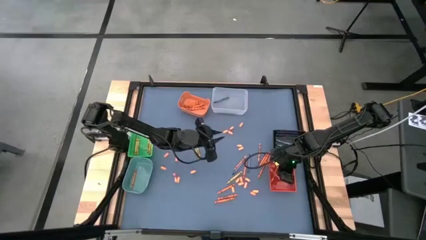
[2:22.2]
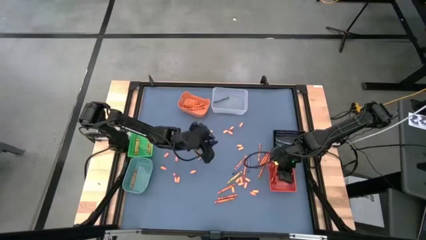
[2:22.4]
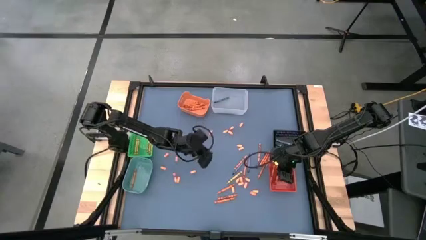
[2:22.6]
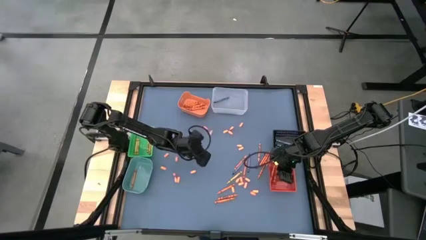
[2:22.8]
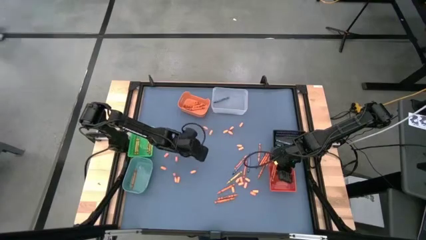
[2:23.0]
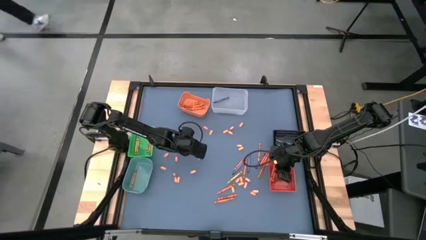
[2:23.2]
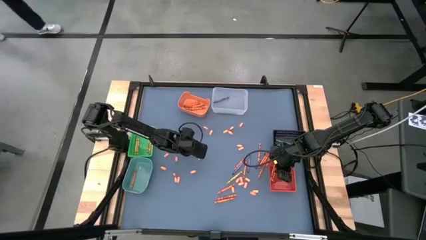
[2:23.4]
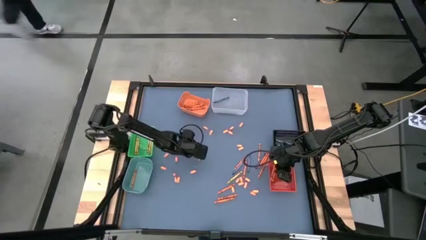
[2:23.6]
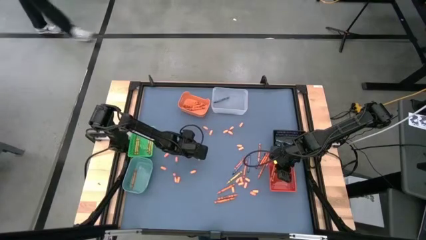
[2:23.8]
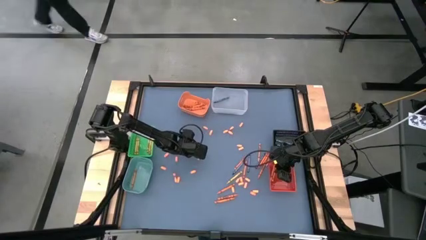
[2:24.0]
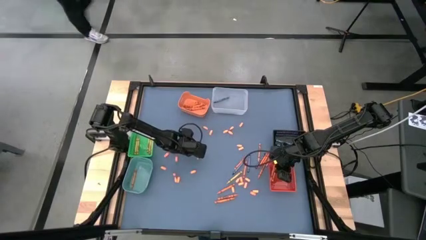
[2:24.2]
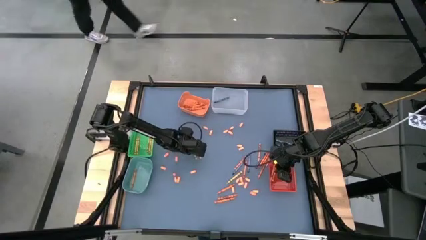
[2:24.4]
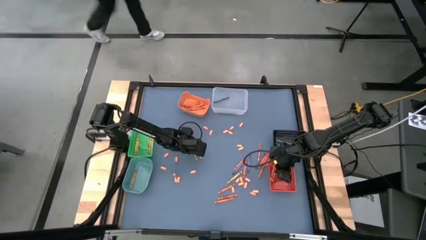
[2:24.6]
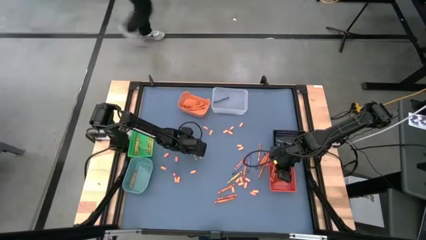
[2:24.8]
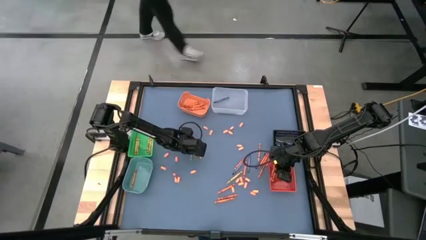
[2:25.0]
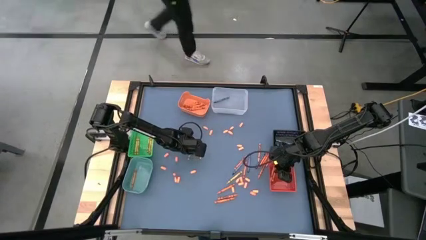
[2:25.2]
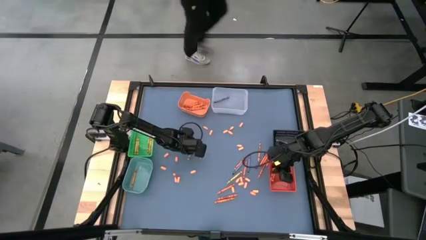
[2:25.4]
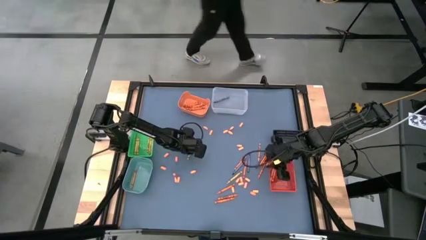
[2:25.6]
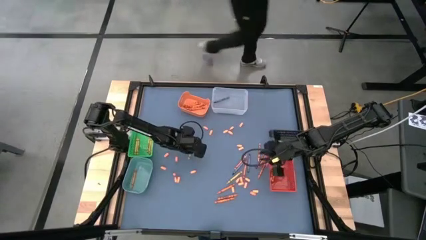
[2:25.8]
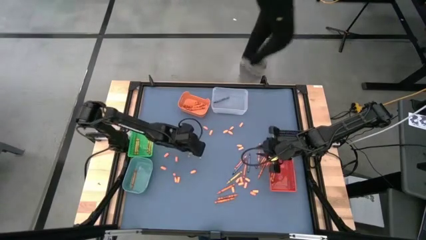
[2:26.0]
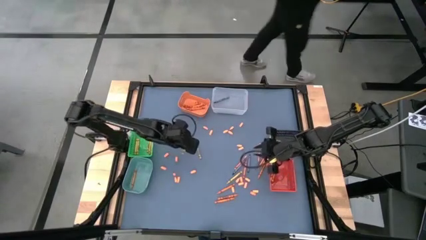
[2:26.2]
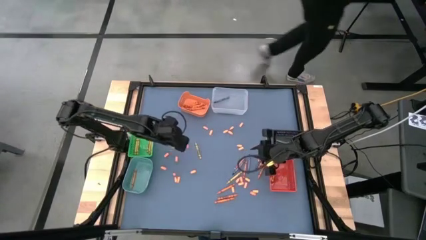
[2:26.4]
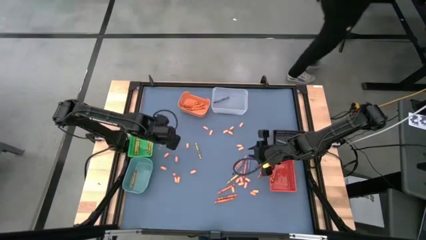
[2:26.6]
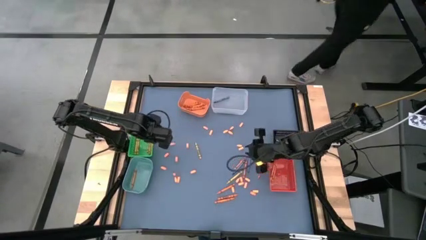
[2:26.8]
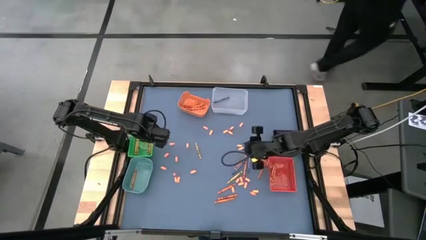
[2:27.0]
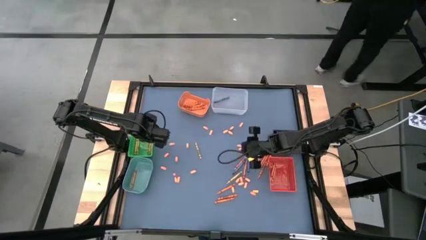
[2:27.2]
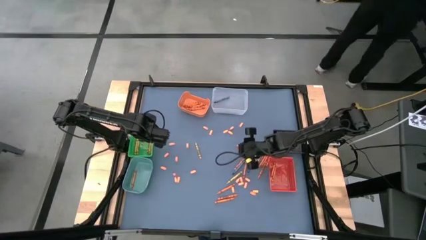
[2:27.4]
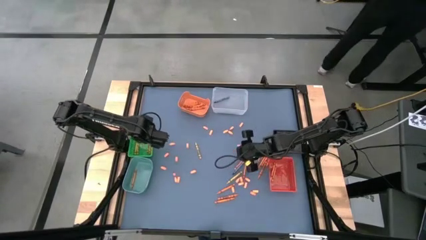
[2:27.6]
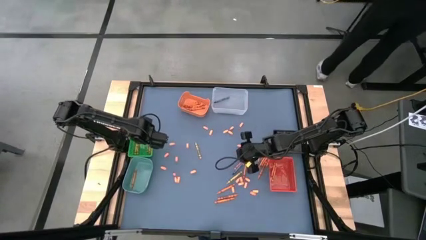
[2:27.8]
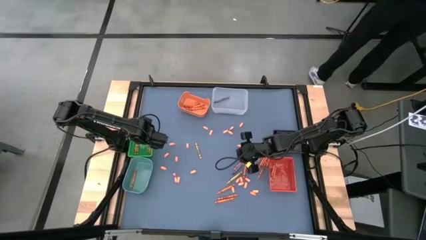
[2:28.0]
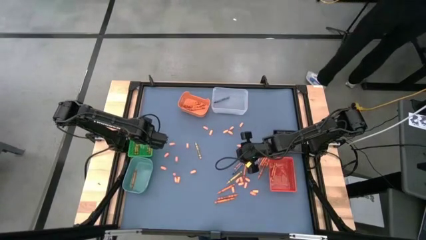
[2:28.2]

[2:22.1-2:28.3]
Task: Sort crayons
Put the yellow crayon into the green bin

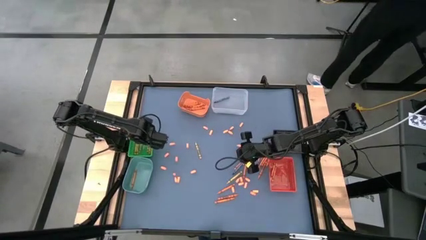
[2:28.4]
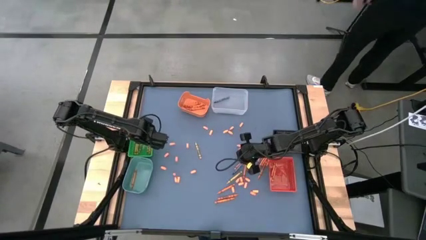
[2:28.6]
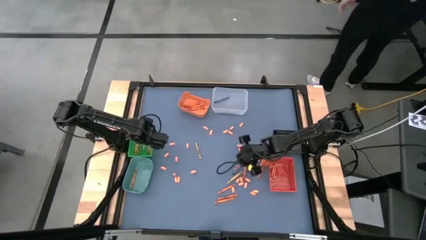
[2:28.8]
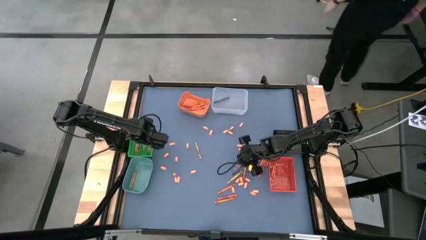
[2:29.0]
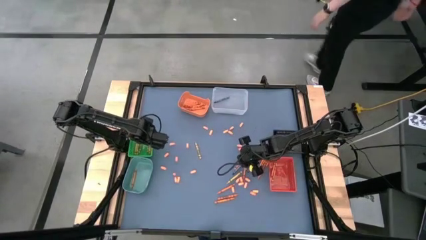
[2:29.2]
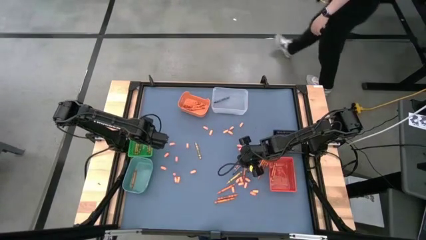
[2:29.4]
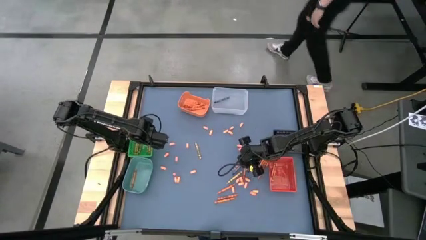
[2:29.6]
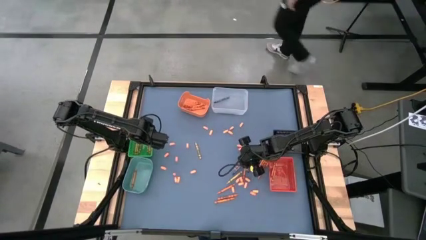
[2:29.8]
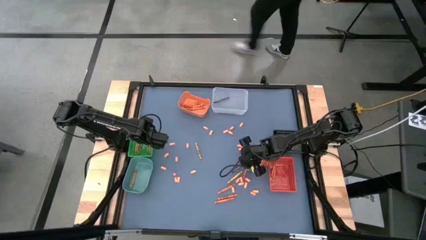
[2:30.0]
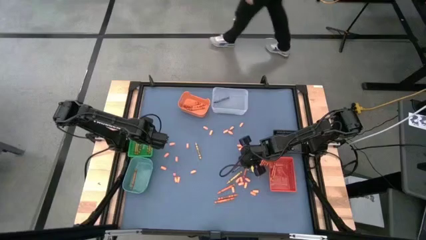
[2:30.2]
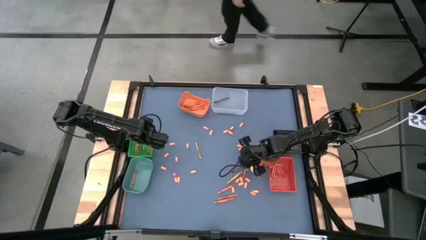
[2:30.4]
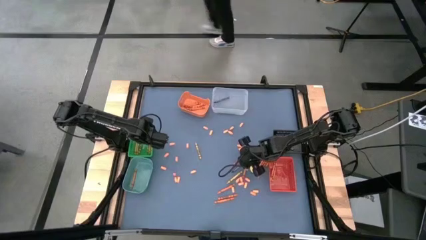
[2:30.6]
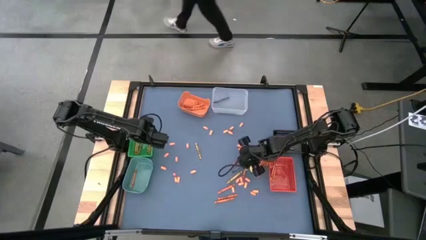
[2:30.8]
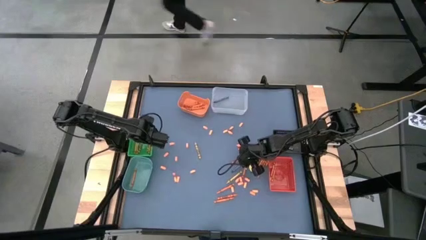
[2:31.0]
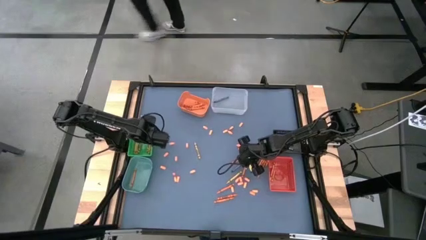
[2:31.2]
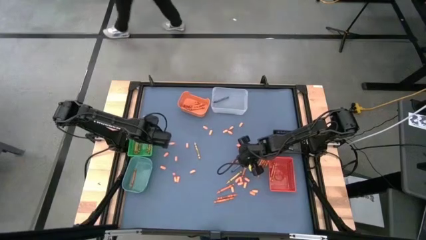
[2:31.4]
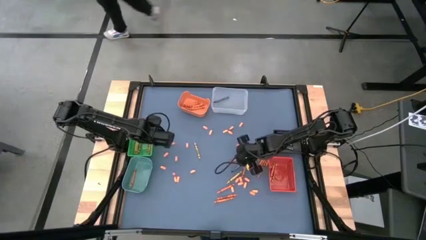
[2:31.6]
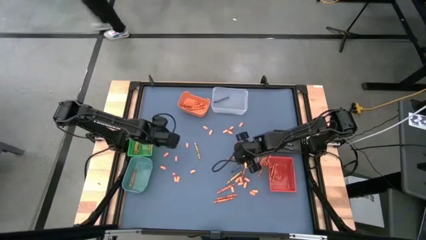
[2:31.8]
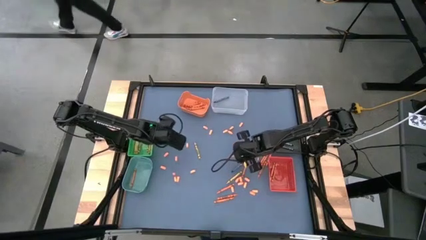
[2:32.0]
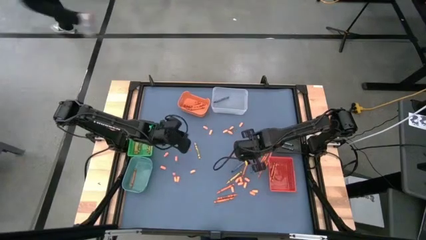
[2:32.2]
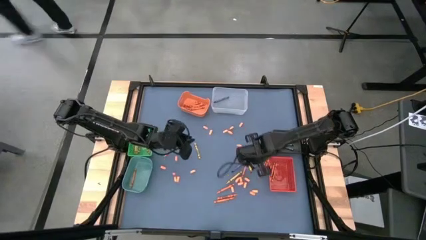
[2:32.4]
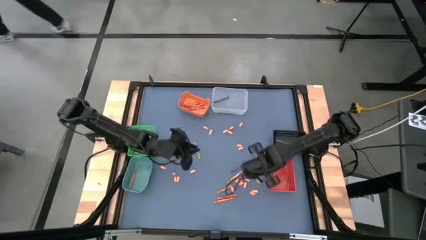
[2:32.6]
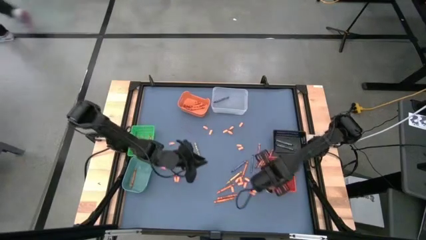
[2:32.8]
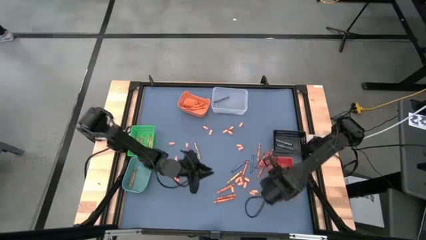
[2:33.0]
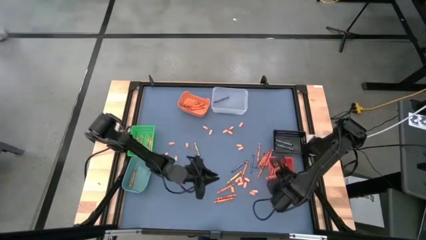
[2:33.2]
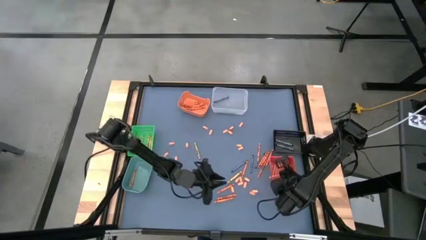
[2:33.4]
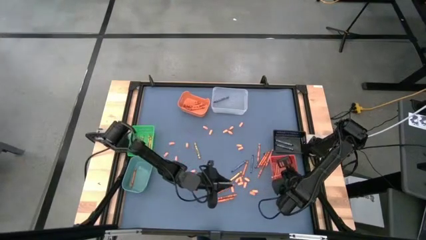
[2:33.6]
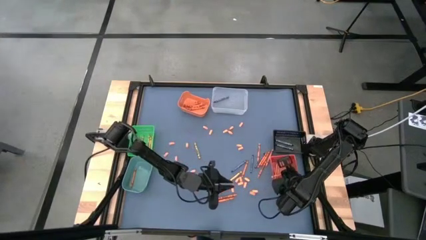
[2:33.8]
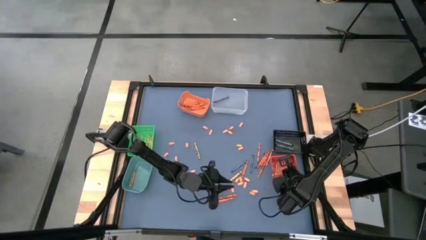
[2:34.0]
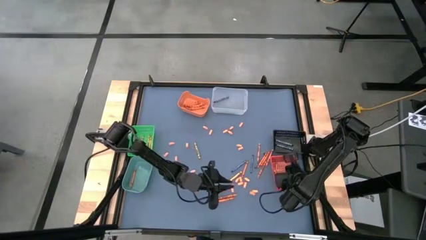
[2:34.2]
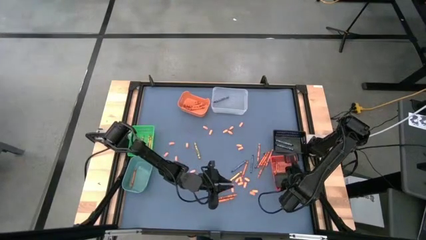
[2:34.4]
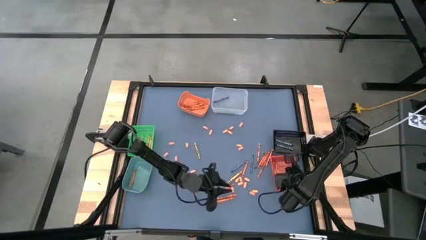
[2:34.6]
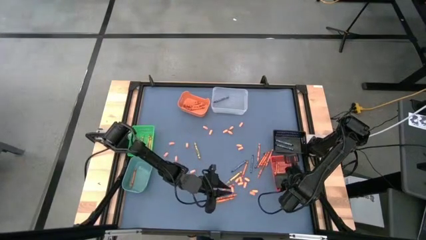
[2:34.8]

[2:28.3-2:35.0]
Put the light orange crayon into the red bin

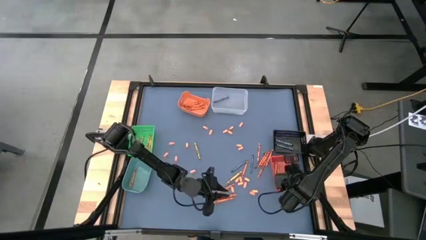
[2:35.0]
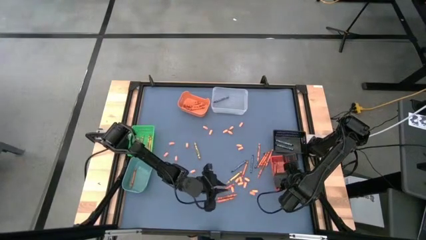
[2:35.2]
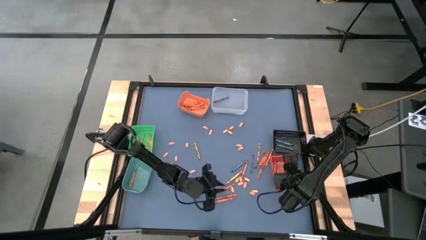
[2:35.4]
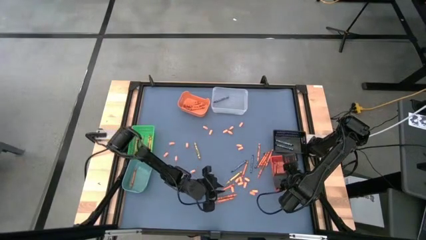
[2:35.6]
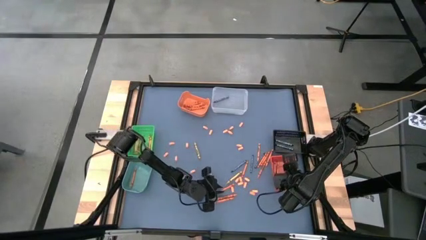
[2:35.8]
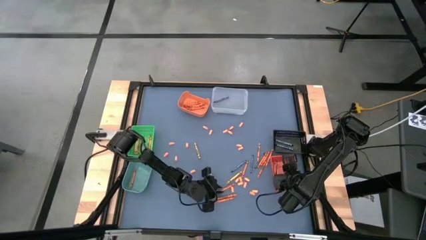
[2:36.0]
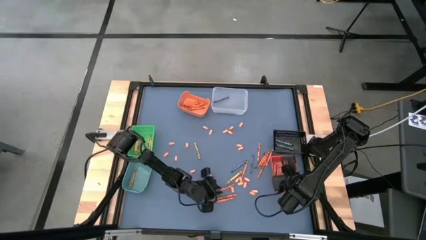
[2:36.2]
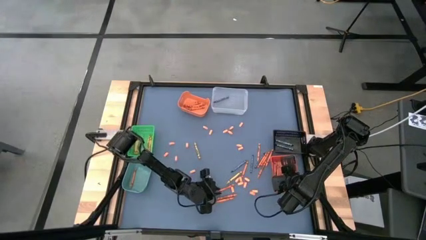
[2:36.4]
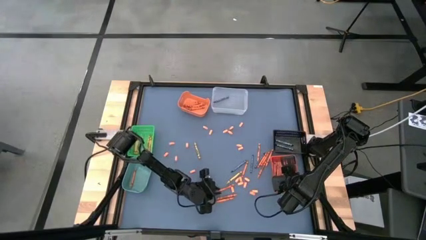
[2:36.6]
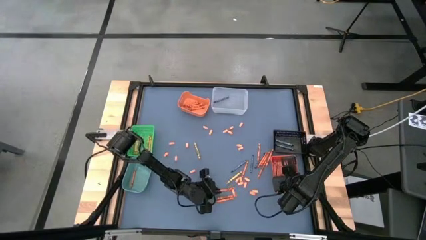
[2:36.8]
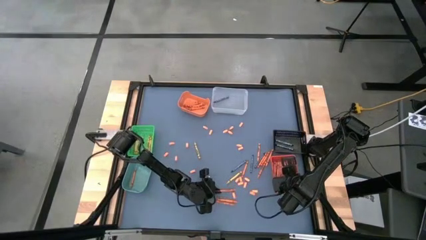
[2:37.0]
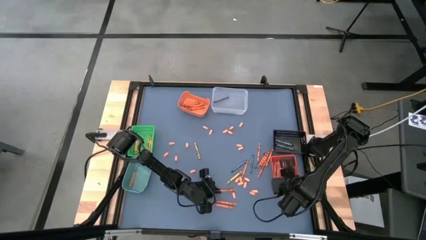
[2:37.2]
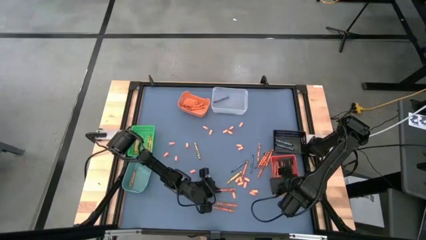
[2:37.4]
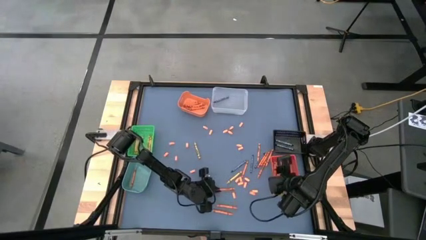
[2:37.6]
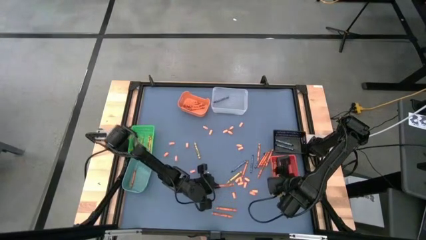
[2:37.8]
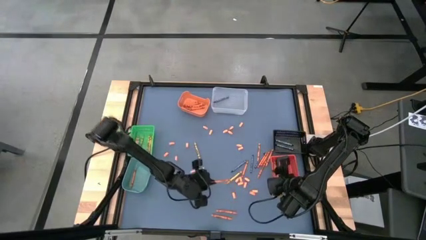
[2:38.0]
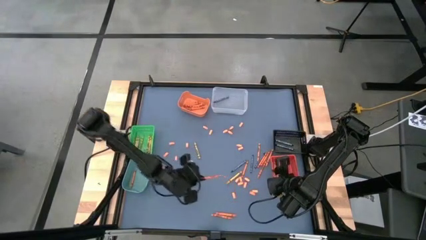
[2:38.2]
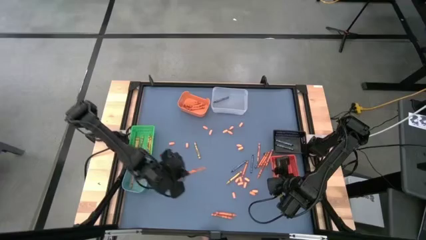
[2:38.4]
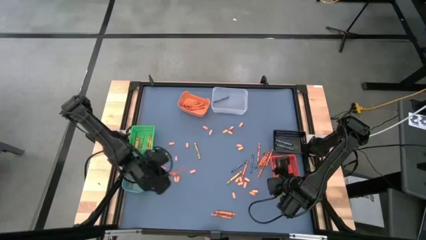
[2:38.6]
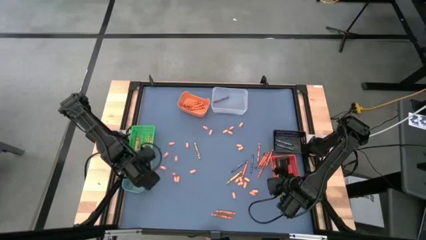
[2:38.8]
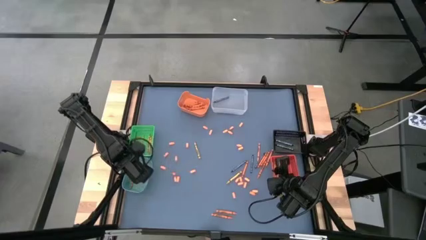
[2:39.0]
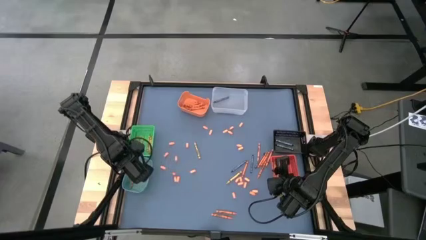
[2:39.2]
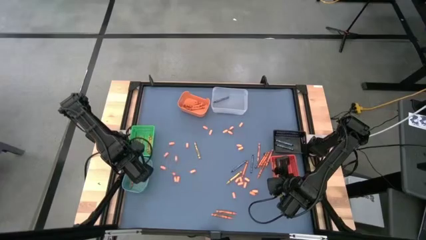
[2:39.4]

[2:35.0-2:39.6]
Put the orange crayon into the blue bin
